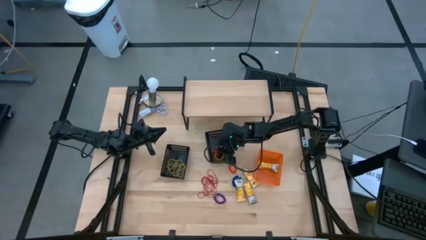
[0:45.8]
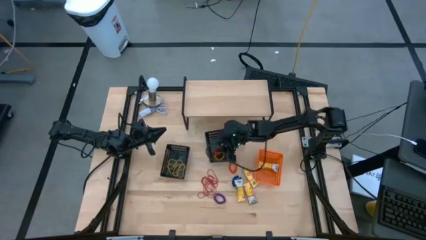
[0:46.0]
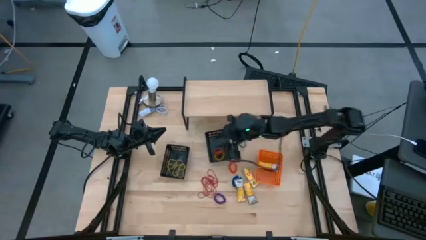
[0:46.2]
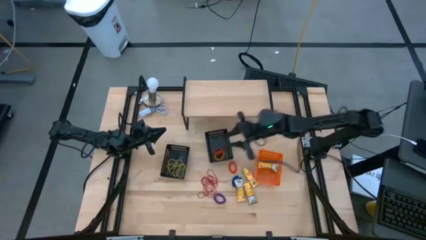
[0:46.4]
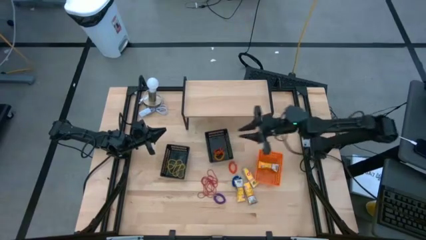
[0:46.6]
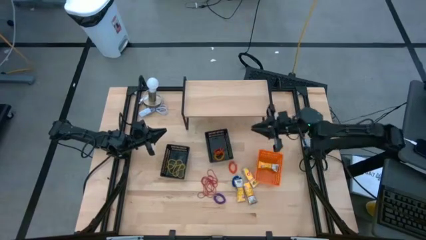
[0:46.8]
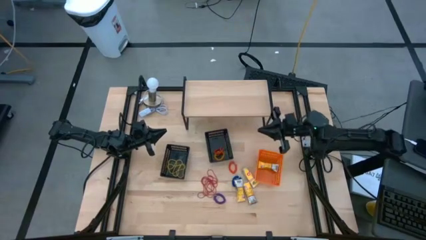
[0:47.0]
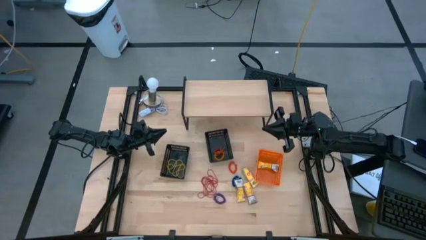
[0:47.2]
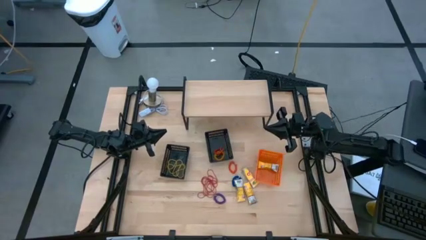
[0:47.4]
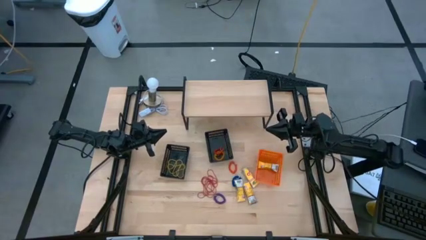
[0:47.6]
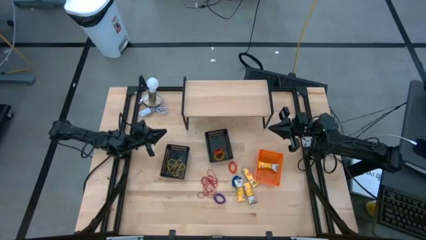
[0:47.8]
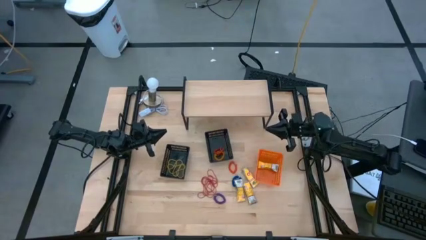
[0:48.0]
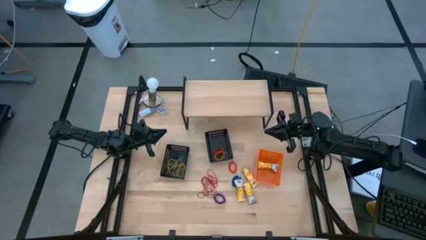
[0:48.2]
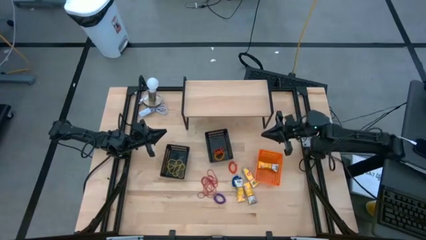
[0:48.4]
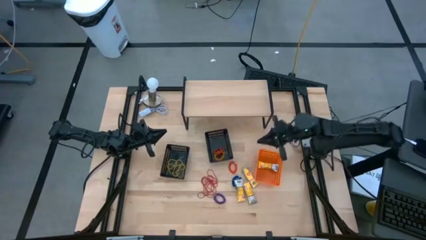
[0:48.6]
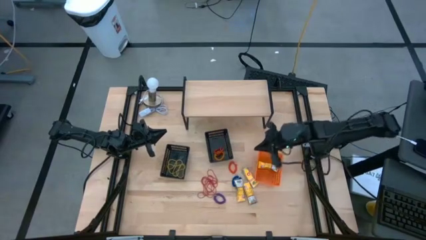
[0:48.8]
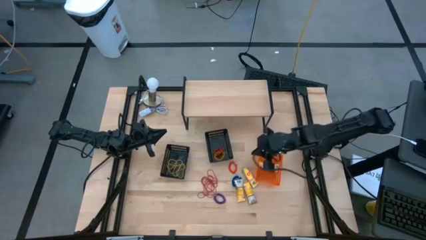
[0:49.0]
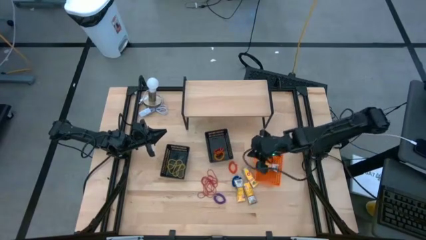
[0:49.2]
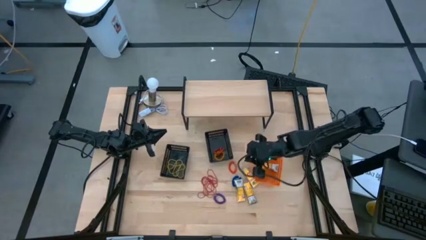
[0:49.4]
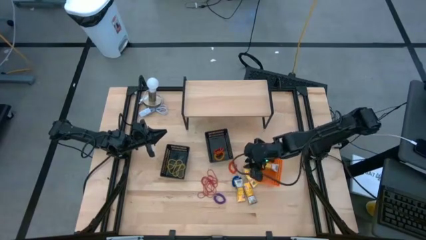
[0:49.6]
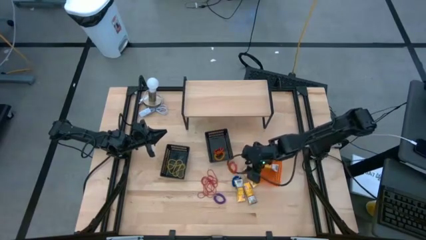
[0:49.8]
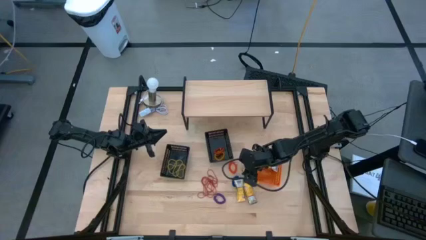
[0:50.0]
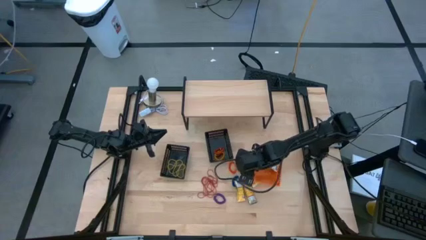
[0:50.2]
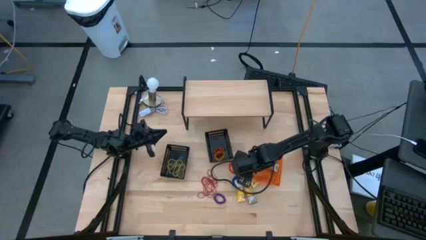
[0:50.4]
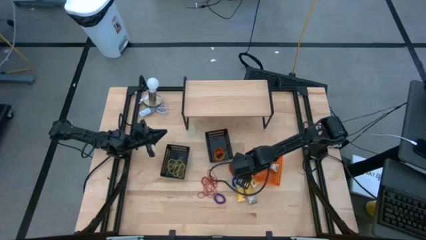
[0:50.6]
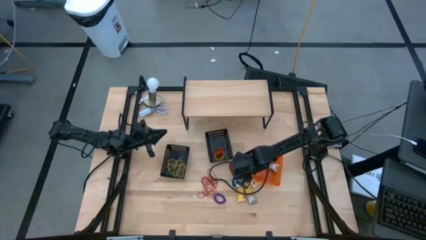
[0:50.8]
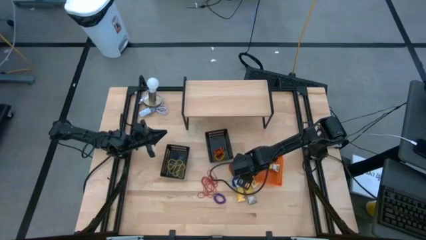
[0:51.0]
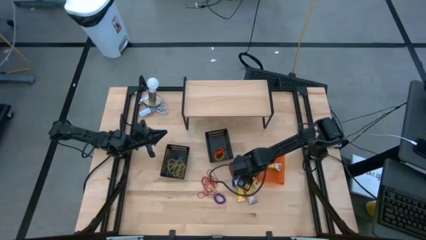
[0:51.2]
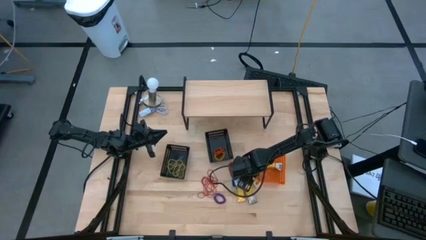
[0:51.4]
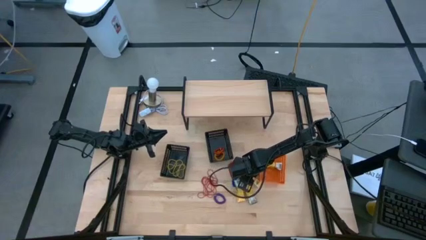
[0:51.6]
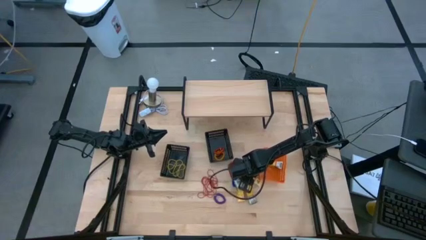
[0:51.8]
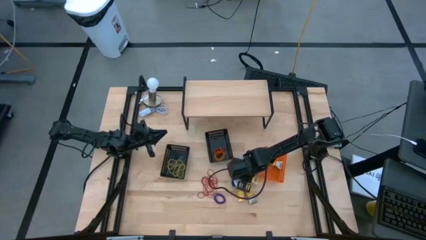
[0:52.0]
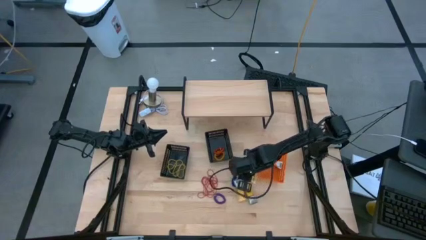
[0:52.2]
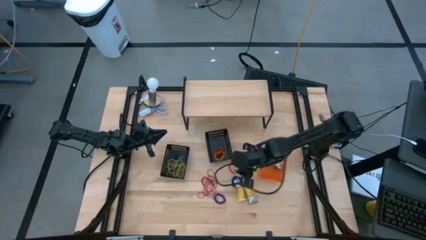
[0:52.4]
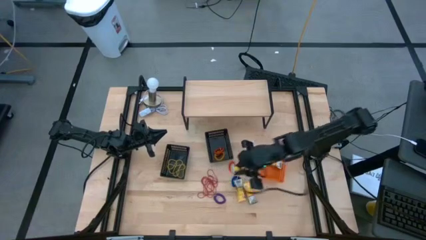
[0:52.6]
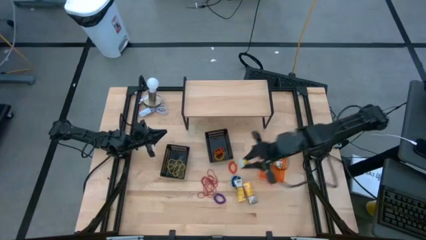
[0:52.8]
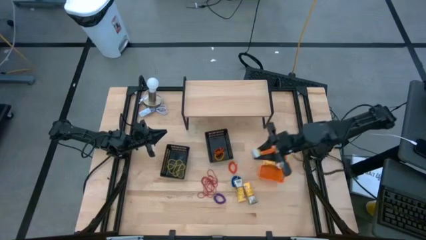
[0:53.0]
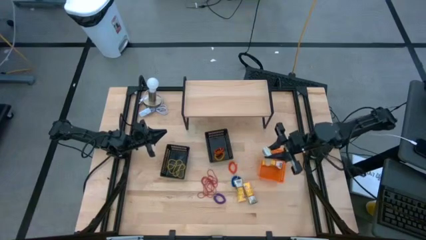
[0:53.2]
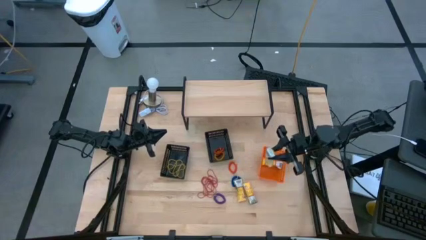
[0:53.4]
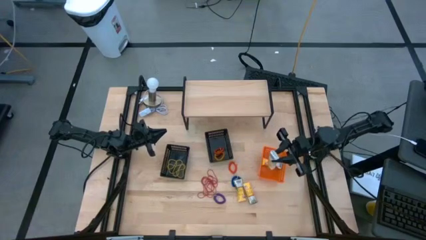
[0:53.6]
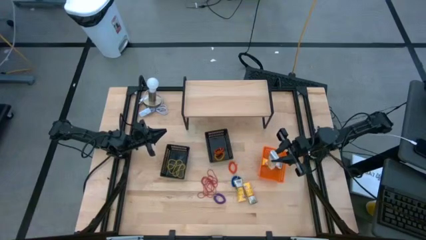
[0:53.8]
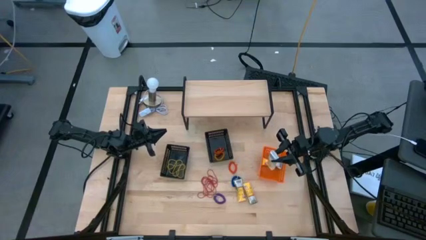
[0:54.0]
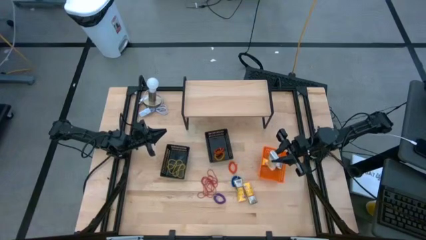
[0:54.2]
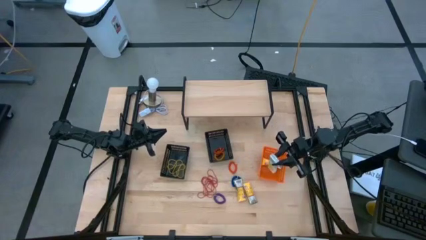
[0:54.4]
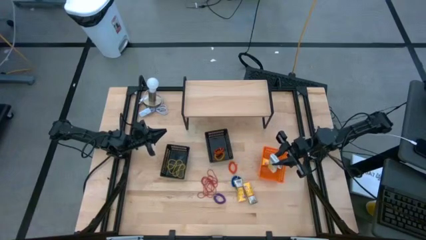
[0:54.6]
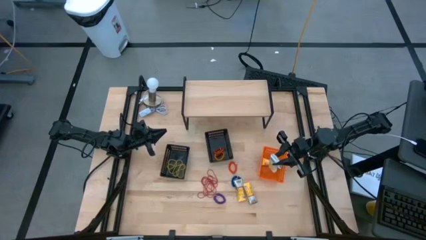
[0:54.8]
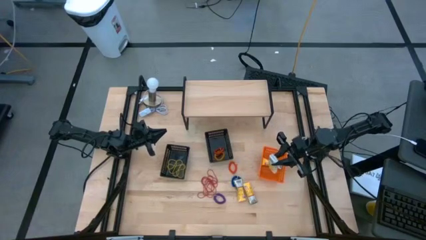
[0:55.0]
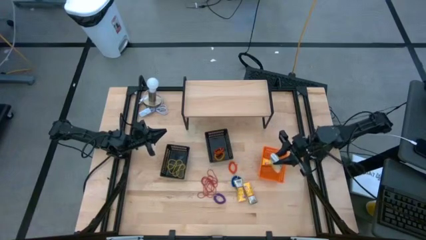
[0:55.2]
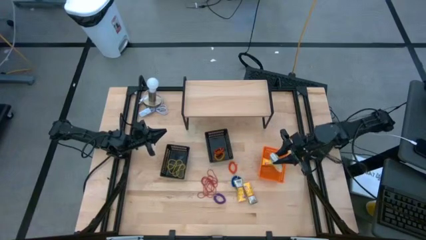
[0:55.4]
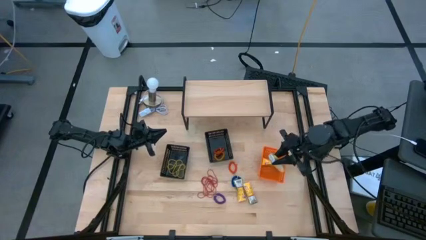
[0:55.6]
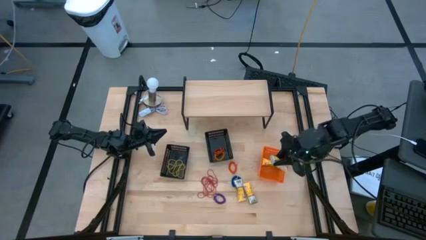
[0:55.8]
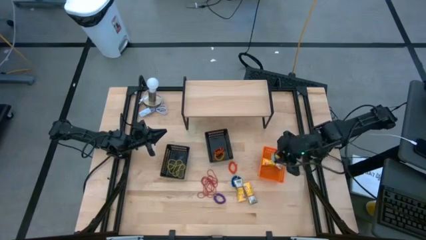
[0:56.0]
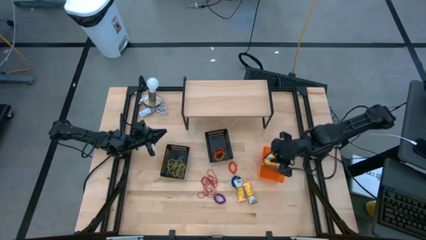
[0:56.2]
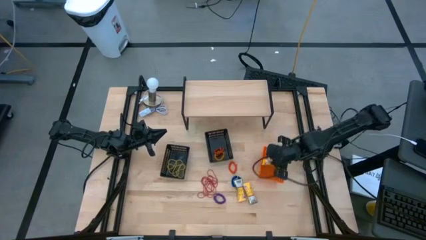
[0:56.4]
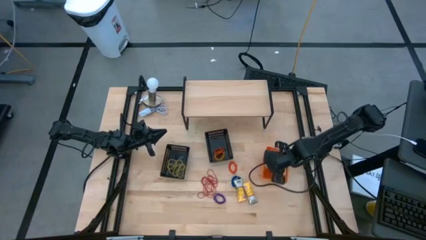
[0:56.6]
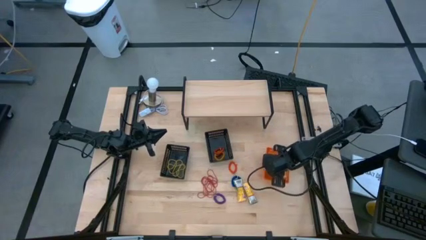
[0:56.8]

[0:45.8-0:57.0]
Task: Pick & Place Office Desk Supplies
Put the yellow crayon box into the orange bin

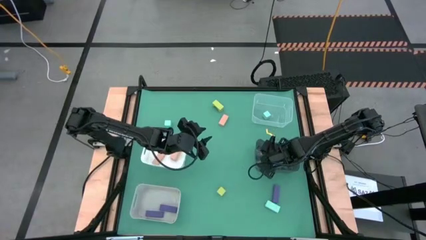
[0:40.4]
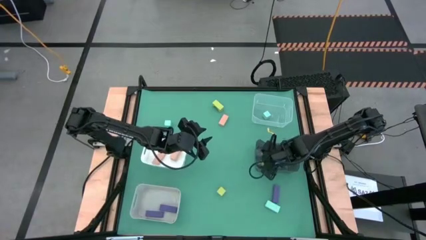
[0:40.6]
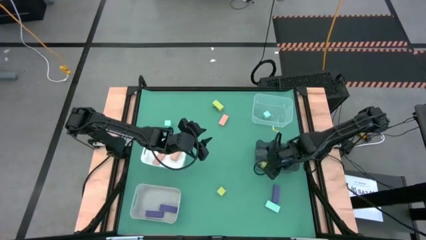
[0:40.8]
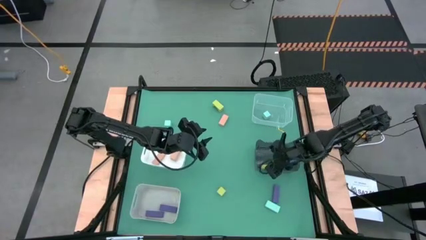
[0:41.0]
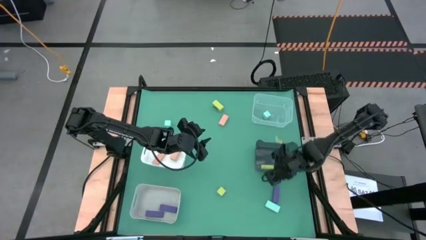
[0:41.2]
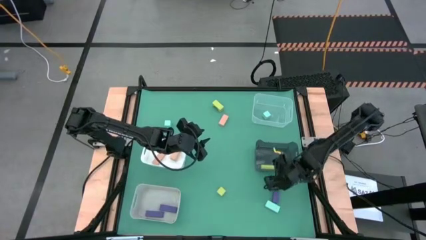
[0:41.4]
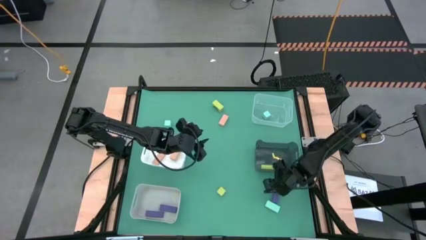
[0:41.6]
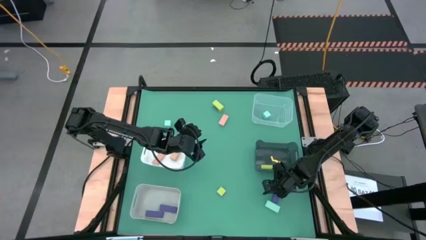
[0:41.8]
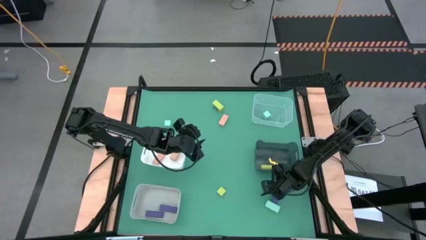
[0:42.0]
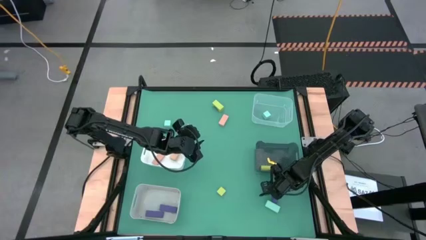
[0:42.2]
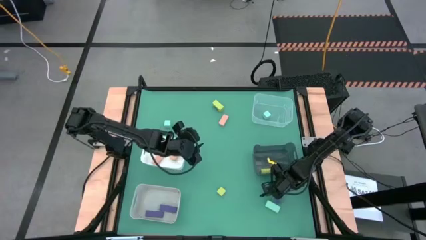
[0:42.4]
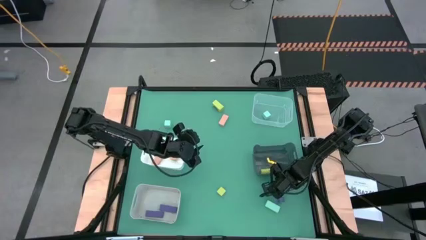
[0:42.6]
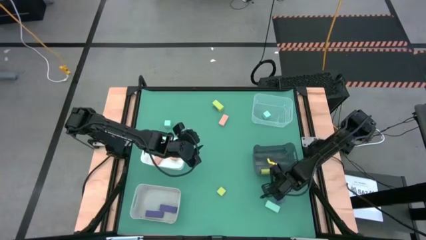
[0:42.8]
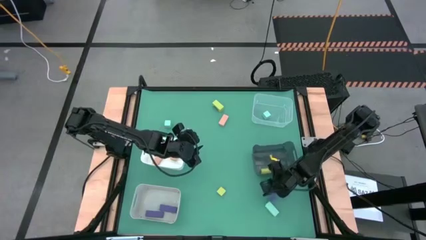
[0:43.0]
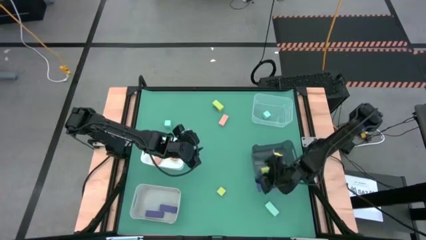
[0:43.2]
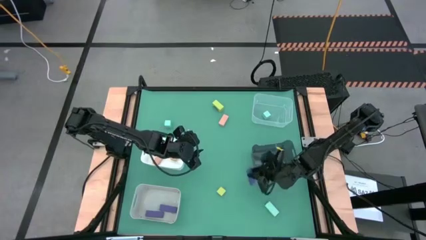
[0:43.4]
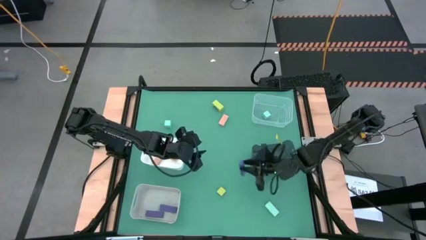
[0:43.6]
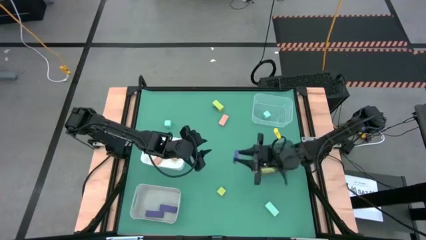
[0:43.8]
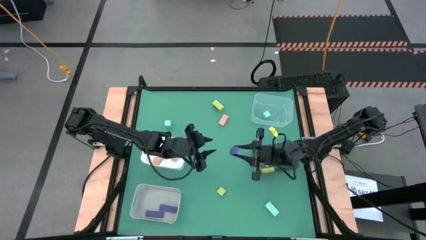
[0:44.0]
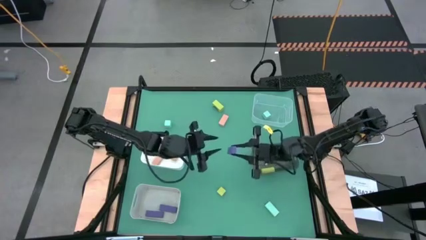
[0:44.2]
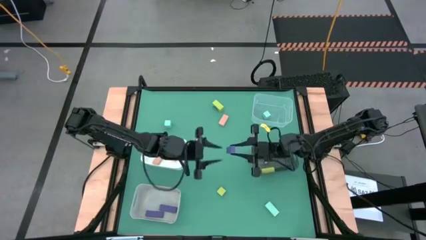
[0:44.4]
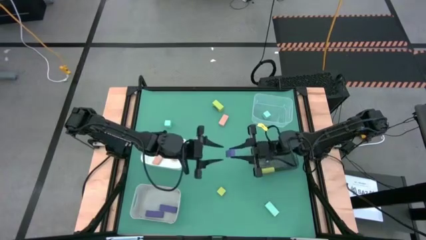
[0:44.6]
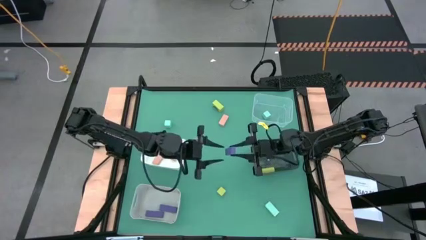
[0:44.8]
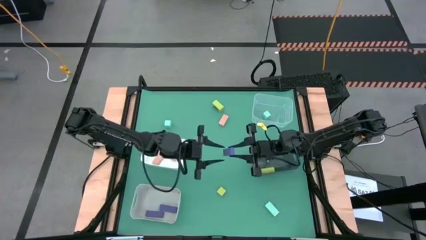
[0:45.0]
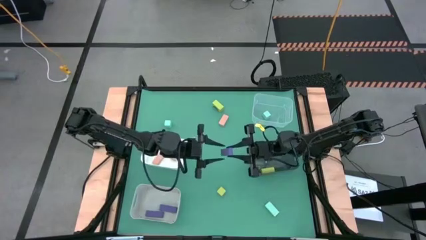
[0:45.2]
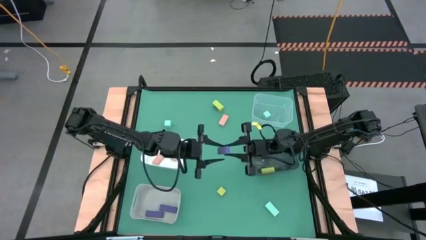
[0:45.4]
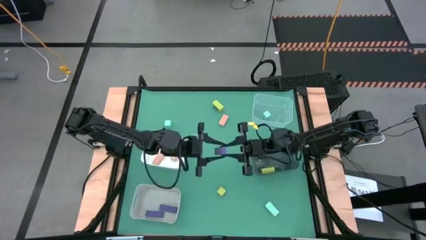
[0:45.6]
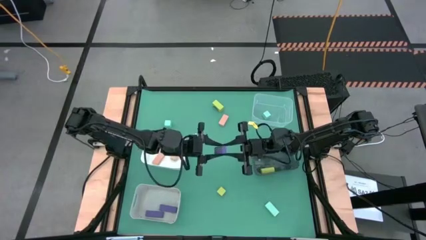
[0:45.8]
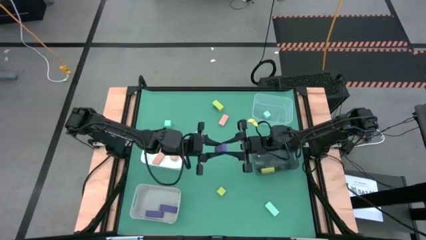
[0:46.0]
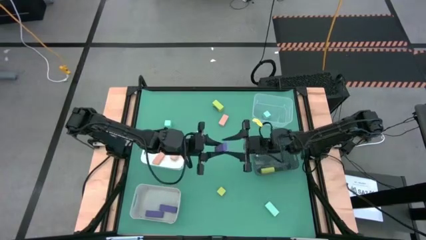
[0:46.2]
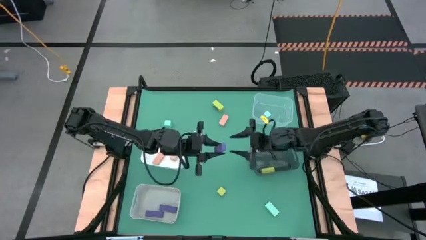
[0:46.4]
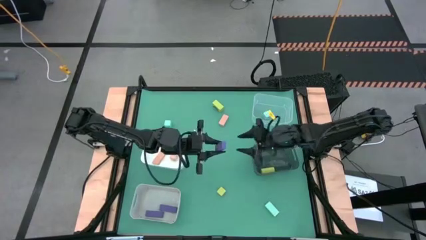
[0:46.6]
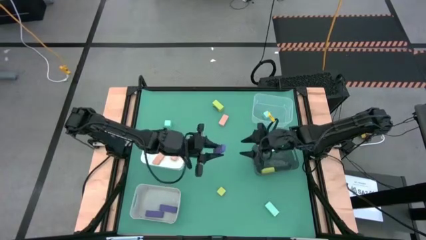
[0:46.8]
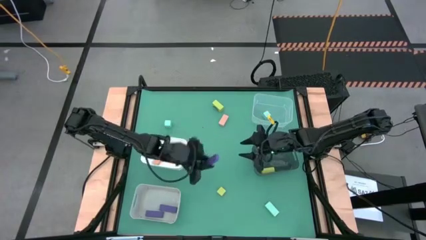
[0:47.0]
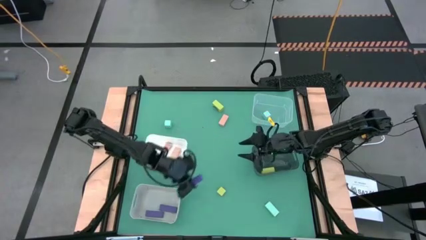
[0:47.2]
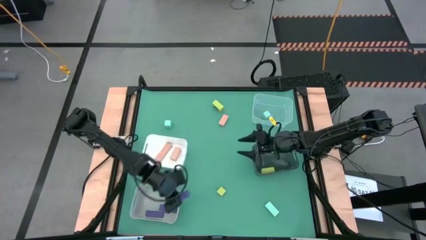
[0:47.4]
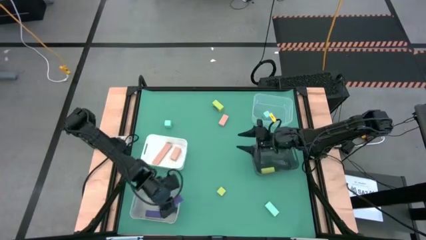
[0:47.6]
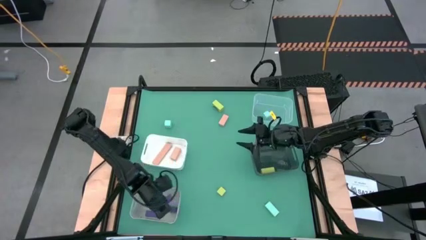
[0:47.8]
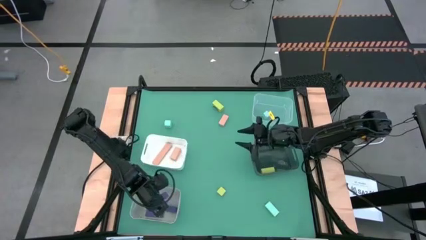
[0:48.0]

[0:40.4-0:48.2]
Task: Sort & place blocks by color
Put the violet block into the gray bin
